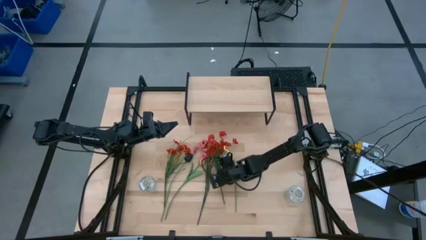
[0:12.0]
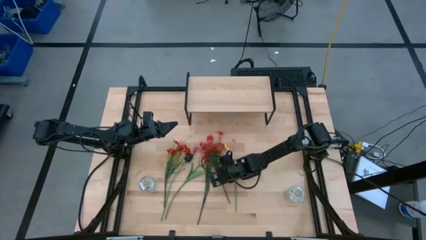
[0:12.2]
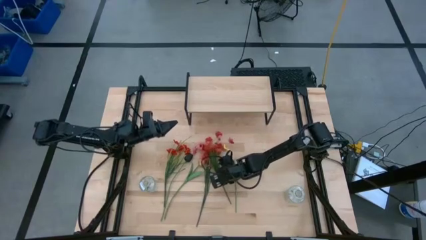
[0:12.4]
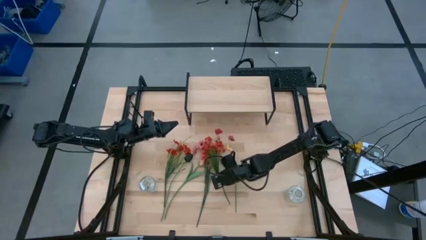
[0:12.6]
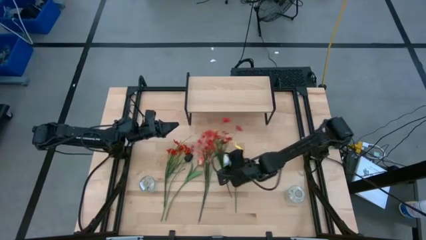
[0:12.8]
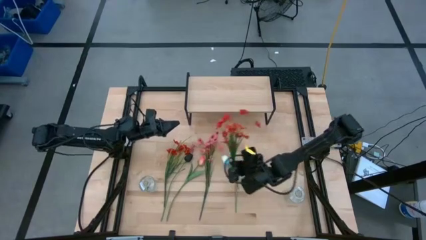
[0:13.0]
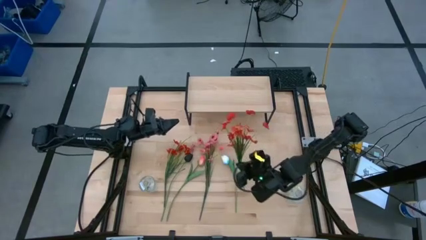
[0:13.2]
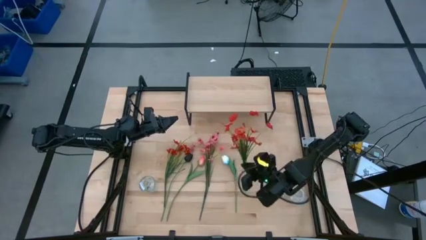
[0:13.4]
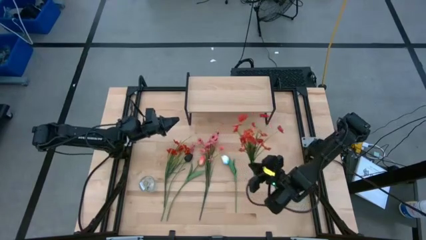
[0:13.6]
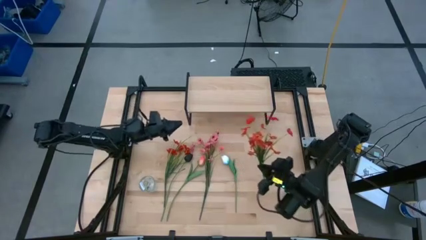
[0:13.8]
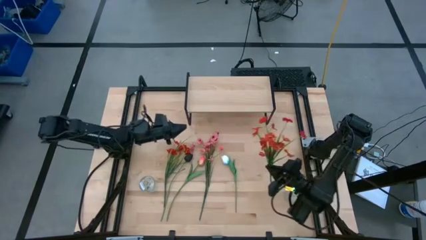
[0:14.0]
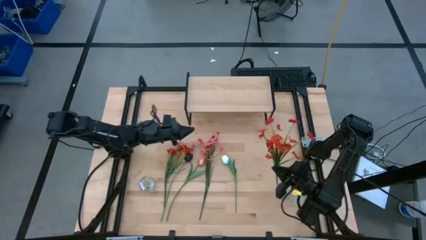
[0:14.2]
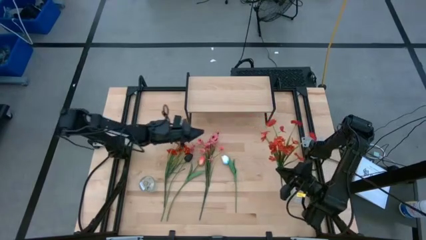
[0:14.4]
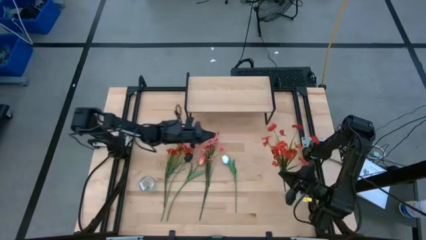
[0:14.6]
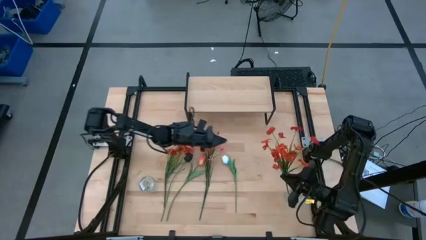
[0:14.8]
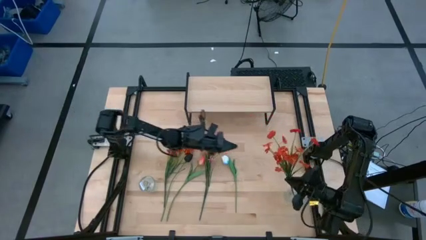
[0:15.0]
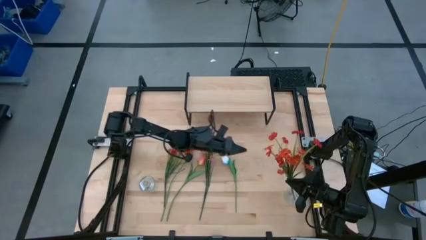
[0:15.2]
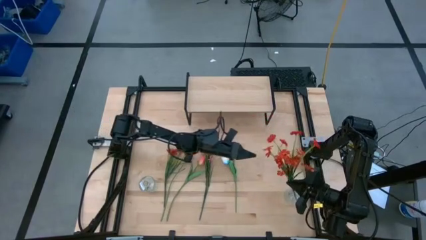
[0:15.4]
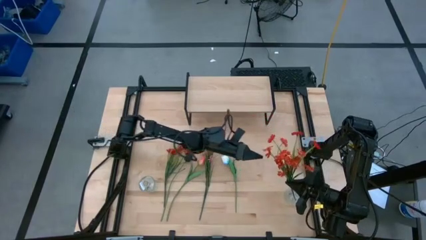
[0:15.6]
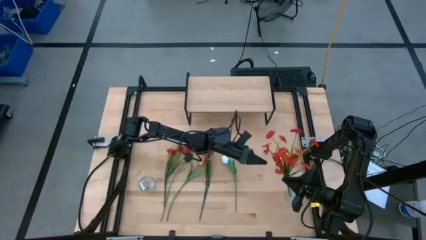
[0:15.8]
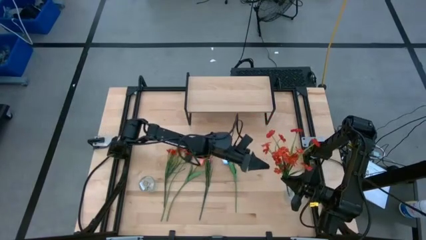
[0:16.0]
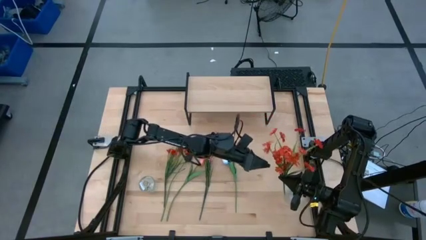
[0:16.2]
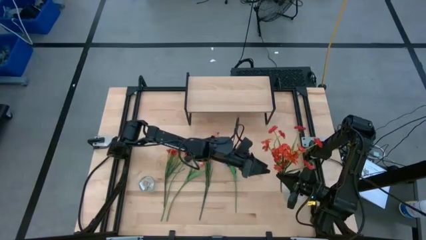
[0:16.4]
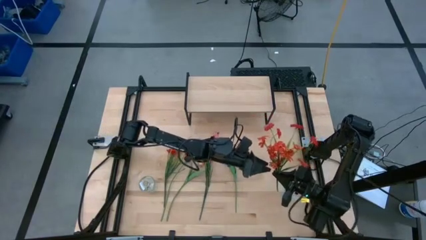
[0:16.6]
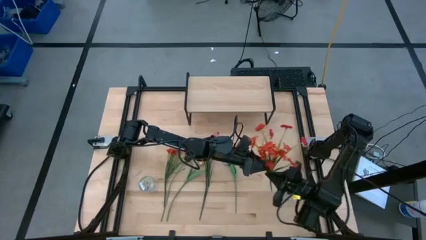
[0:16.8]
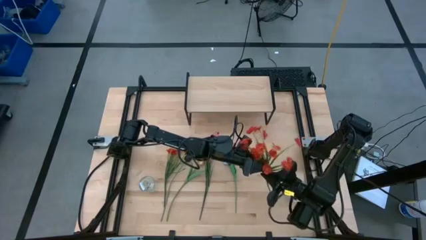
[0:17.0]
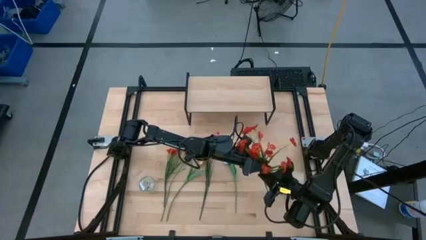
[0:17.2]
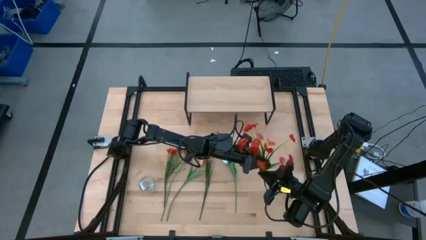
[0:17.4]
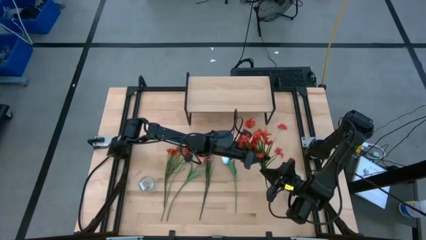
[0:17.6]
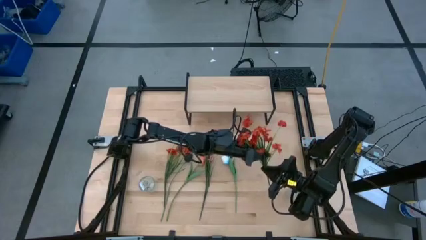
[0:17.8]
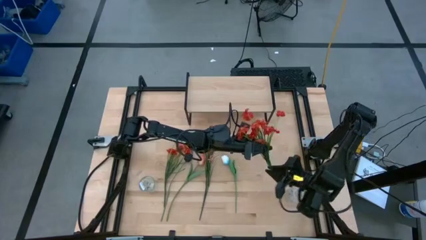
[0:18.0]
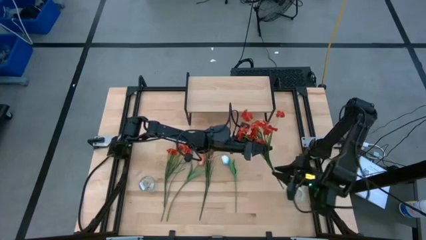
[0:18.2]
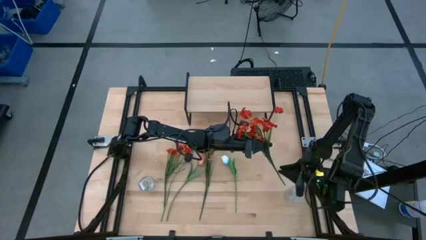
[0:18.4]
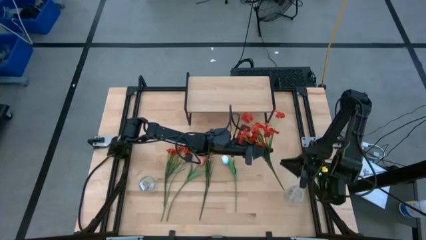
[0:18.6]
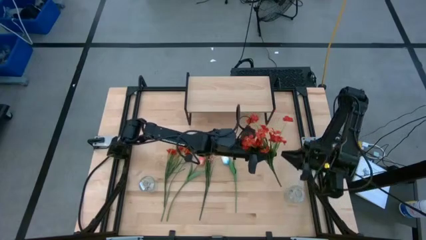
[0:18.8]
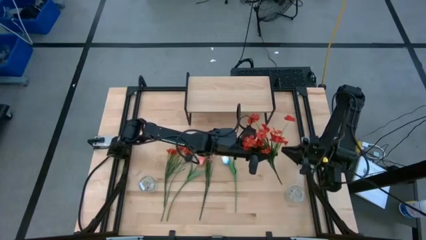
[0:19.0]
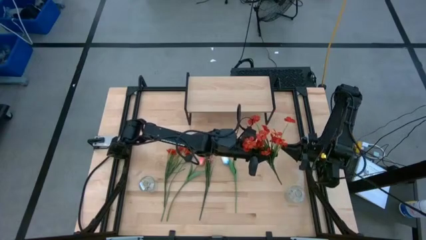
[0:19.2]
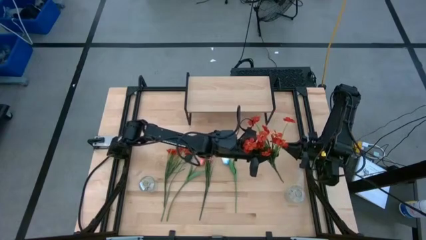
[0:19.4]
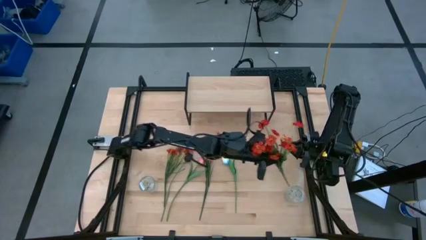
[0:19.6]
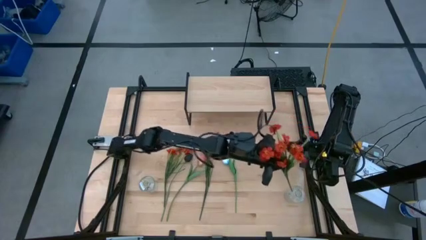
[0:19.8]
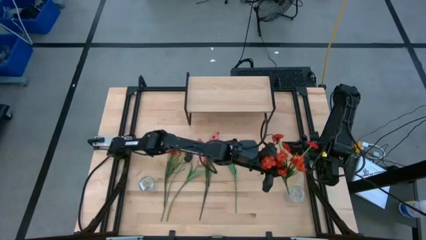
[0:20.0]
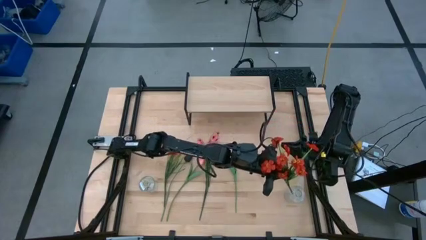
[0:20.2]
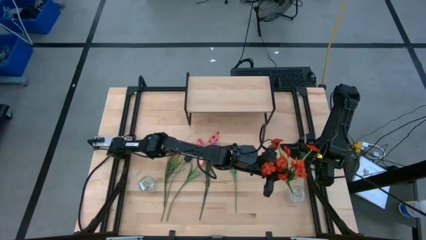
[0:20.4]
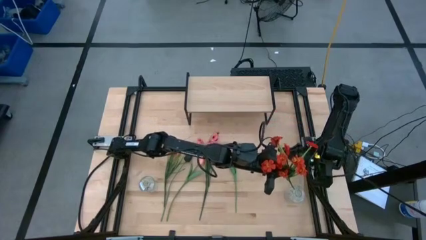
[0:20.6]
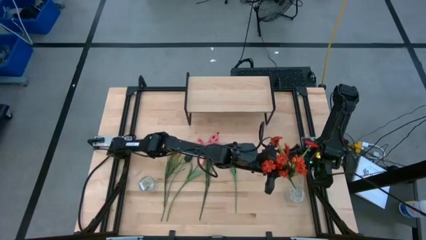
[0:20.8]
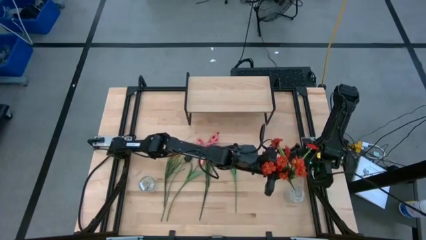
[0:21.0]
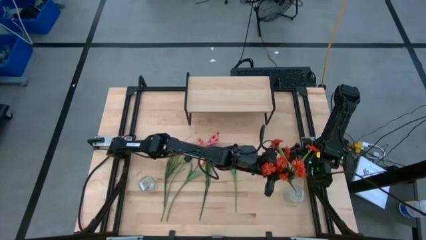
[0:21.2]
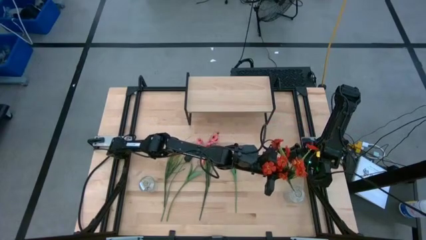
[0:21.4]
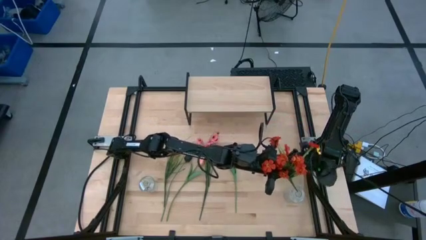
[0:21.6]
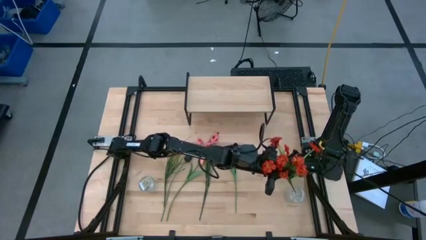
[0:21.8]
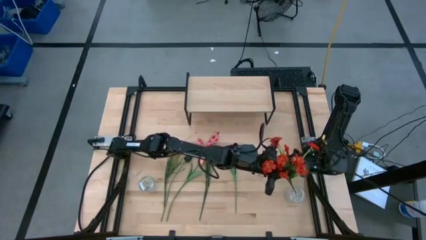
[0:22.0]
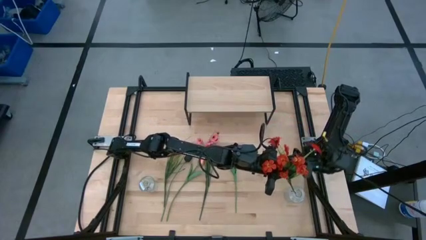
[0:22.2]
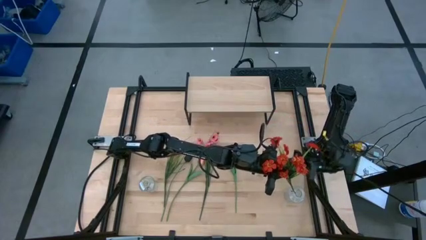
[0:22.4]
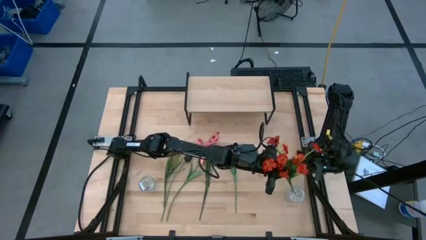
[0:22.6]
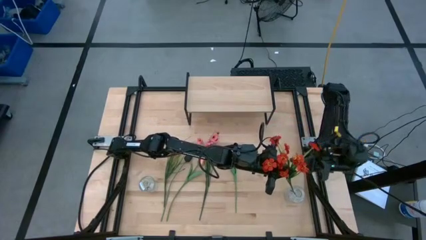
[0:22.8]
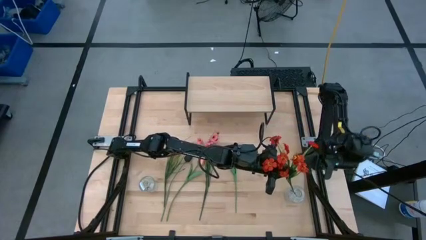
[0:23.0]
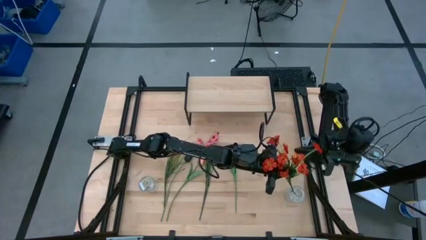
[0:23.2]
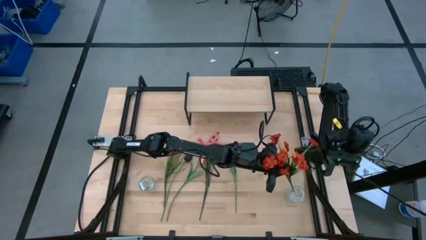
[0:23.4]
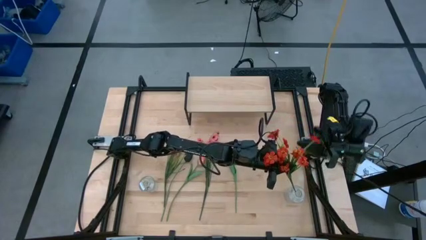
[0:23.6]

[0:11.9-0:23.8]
Task: Pick and place flowers into a vace then onto a shelf
Put the right orange flowers into the right transparent vase

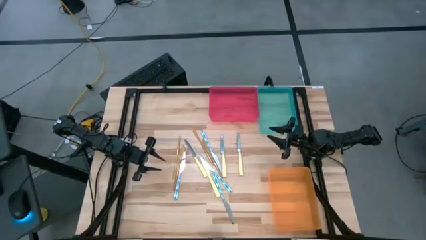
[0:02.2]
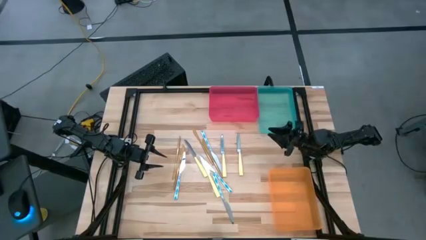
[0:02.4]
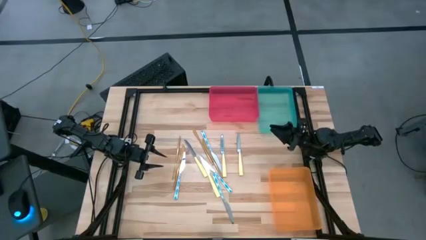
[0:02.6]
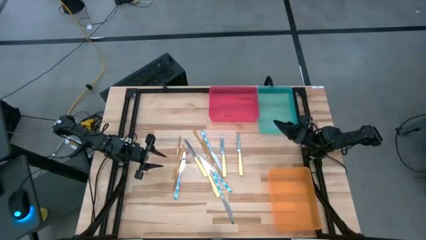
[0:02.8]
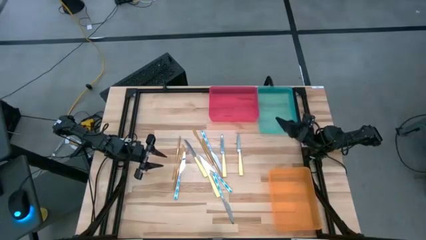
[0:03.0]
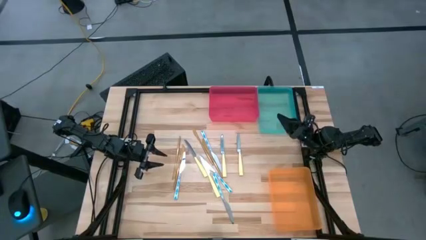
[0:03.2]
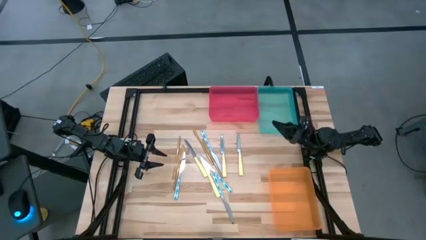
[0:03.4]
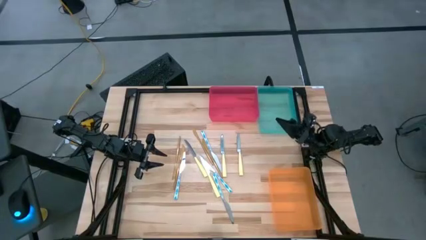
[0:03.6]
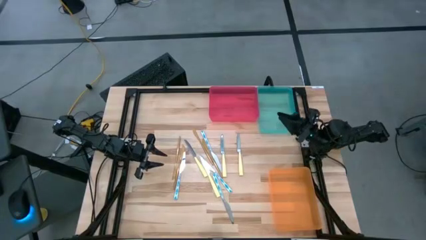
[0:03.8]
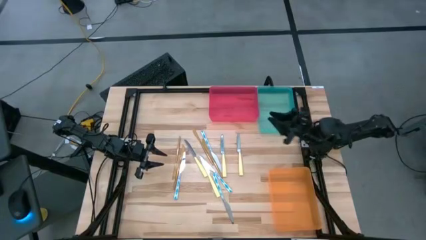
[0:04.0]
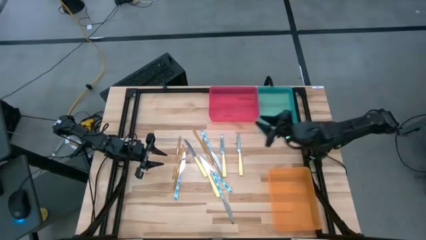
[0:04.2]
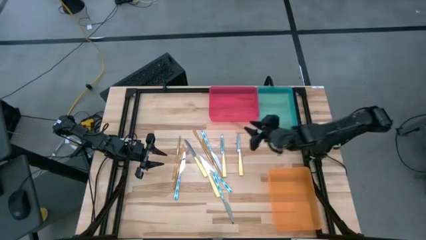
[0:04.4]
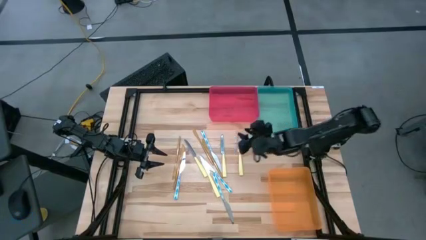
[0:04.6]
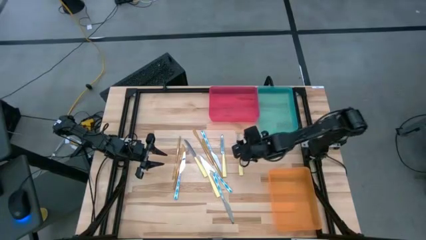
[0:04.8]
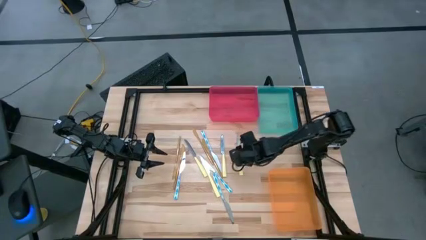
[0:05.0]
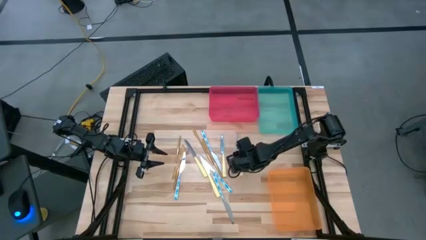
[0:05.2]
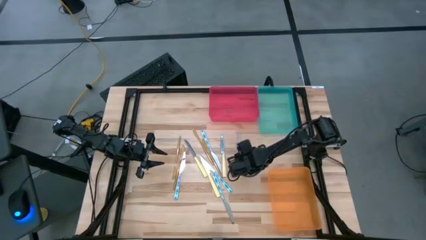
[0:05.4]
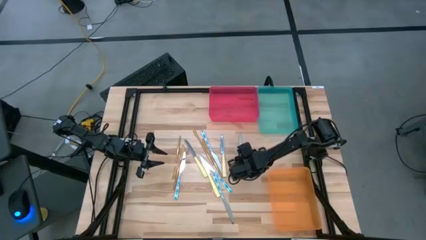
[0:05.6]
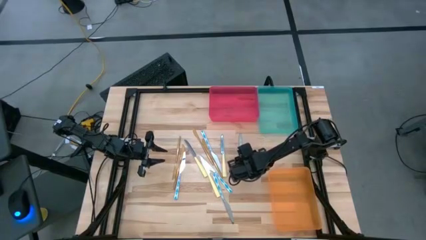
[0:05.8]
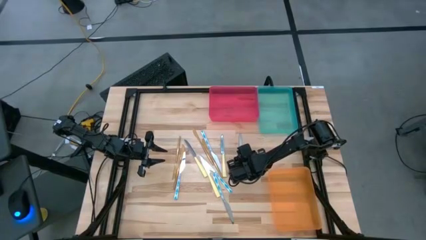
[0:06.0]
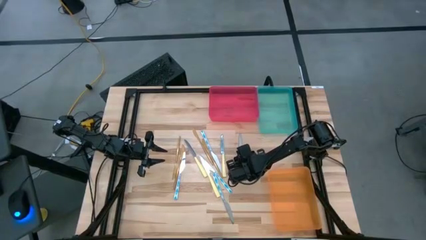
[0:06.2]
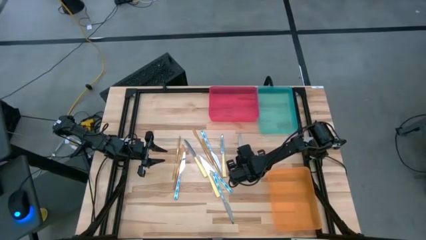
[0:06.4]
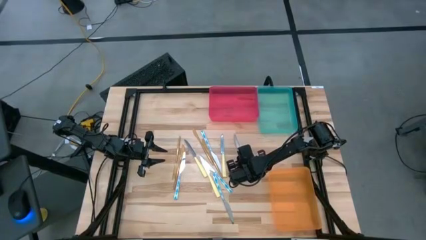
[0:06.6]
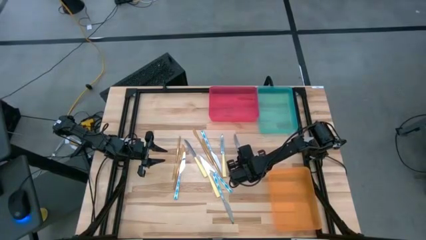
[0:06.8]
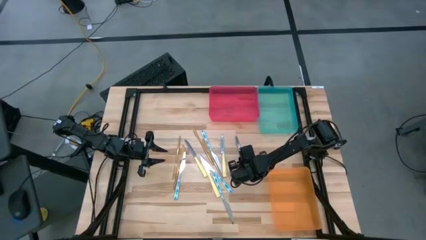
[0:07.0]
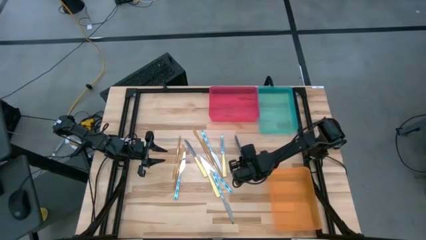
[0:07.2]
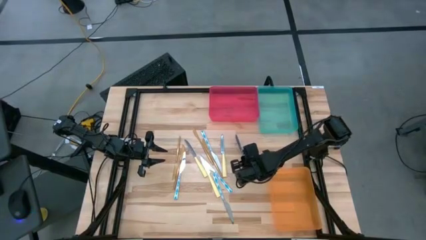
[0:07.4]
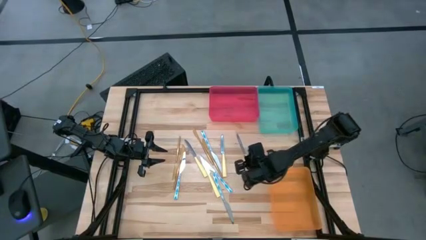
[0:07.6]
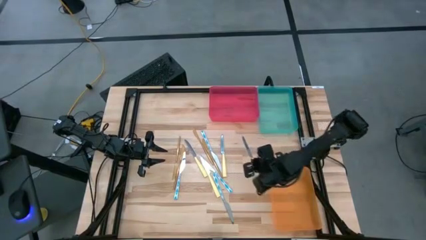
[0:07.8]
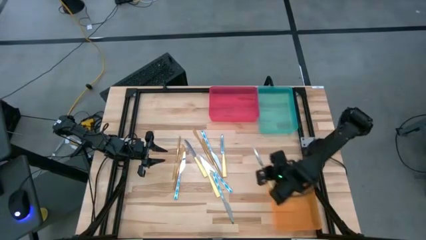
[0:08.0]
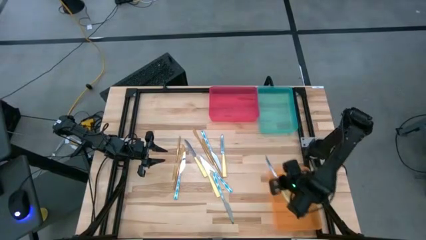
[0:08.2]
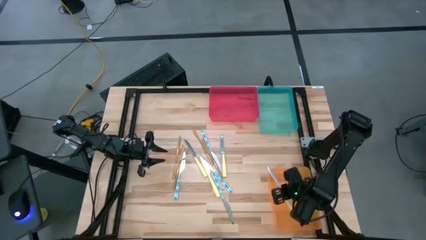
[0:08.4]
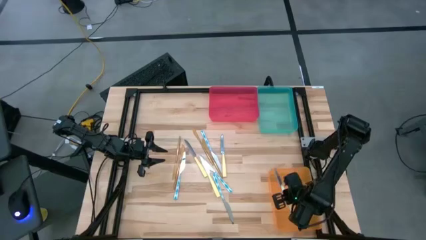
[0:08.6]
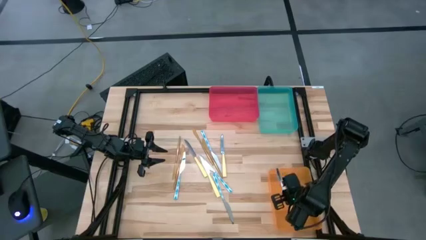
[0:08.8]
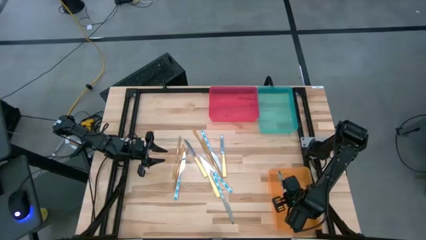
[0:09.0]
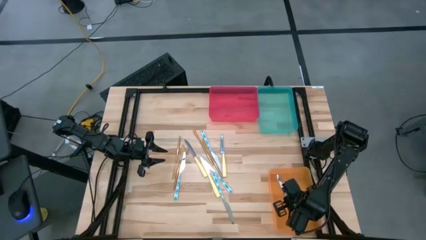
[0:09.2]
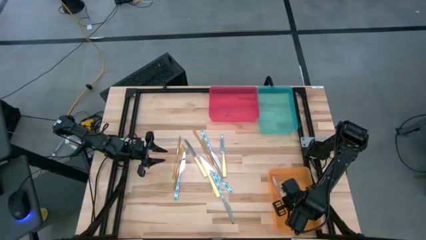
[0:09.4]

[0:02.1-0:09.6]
Task: Sort silverware by color (type)
Put the yellow knife into the orange bin
